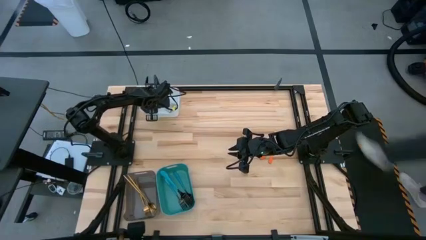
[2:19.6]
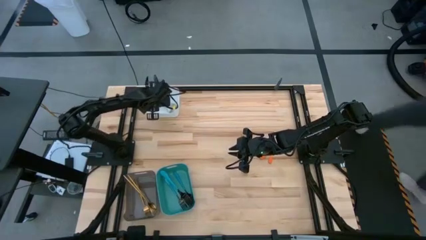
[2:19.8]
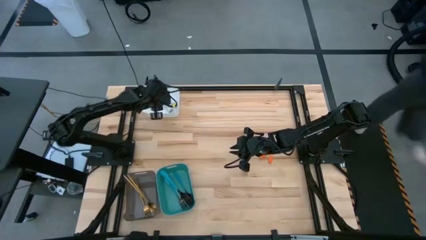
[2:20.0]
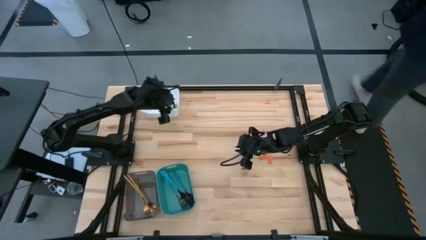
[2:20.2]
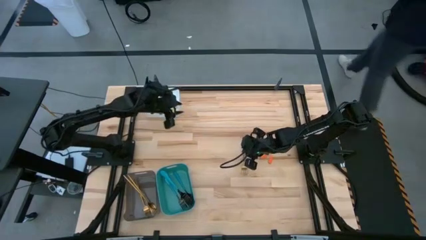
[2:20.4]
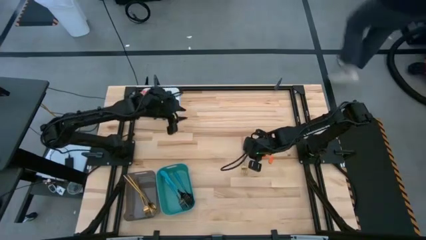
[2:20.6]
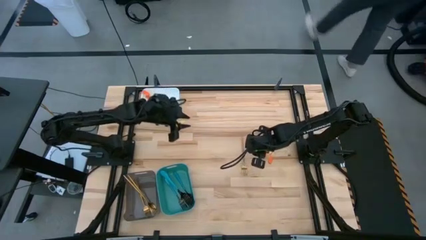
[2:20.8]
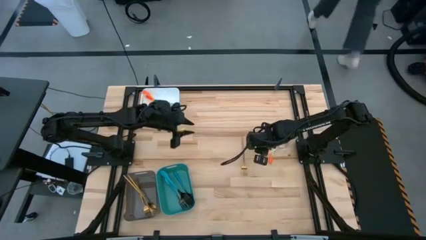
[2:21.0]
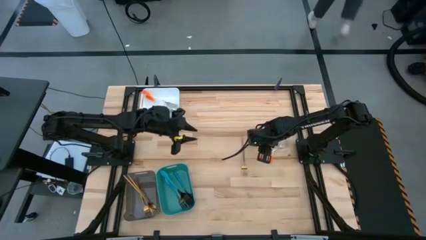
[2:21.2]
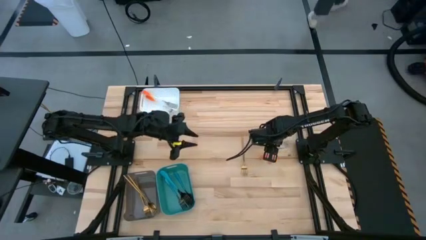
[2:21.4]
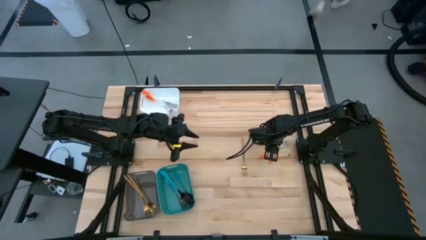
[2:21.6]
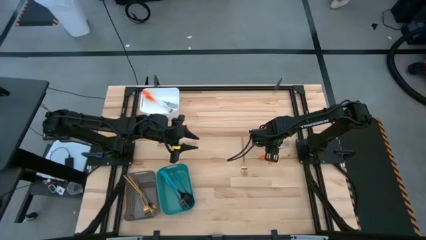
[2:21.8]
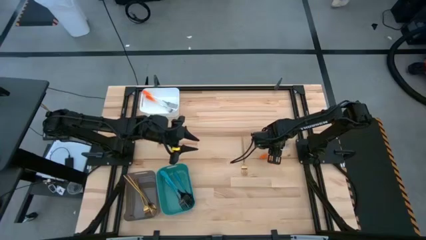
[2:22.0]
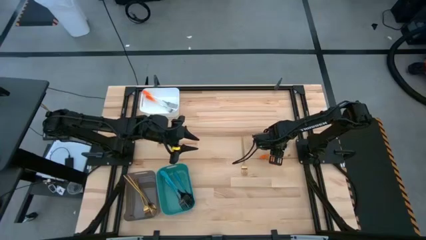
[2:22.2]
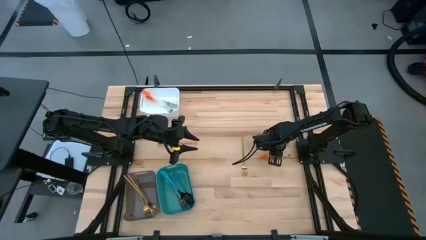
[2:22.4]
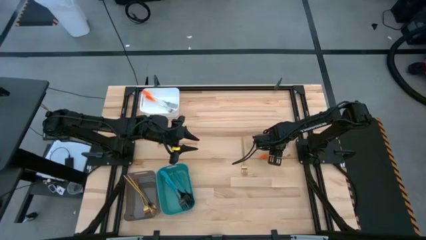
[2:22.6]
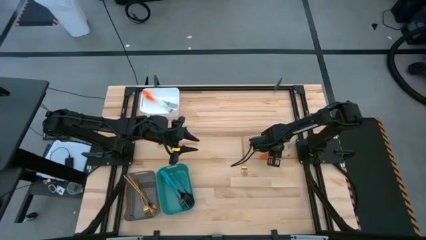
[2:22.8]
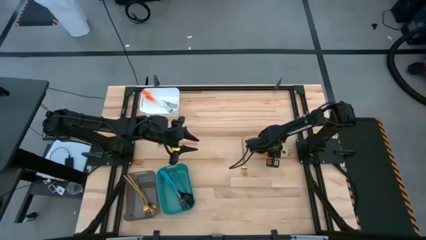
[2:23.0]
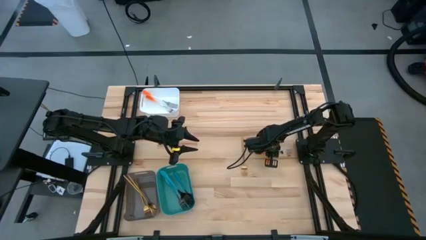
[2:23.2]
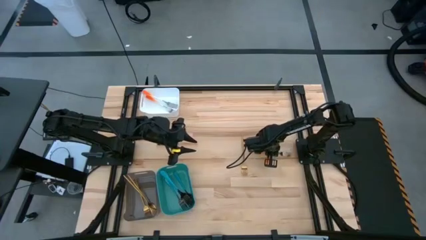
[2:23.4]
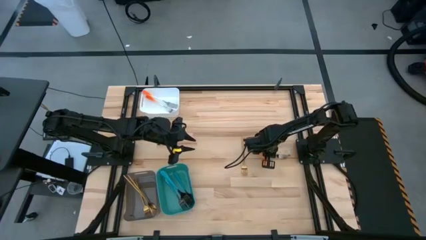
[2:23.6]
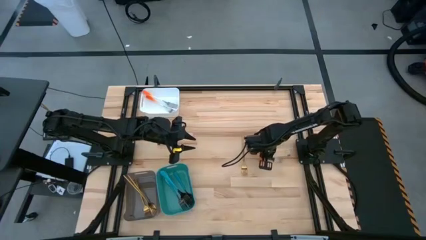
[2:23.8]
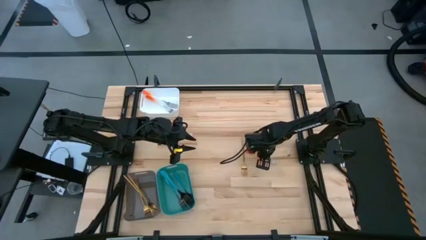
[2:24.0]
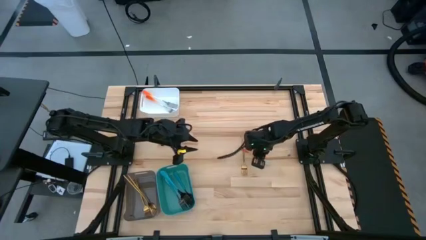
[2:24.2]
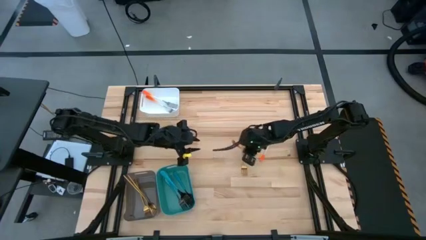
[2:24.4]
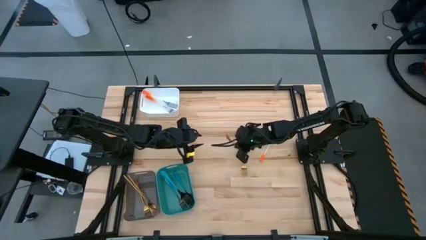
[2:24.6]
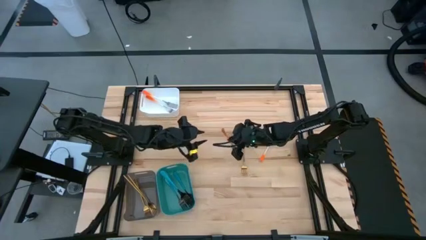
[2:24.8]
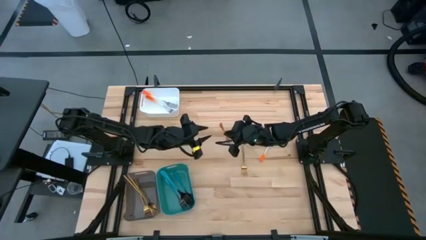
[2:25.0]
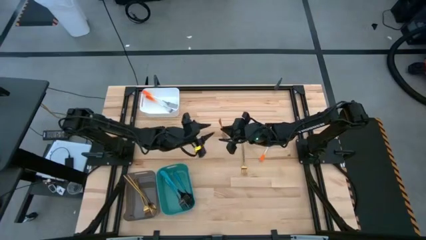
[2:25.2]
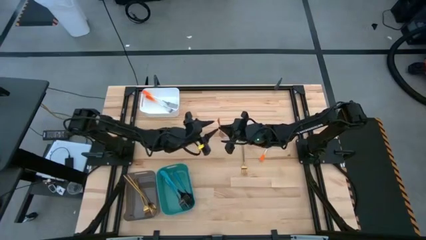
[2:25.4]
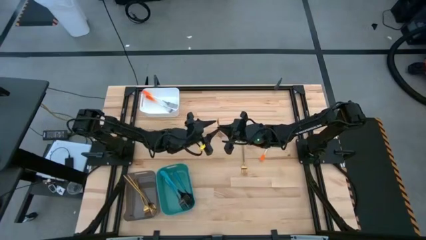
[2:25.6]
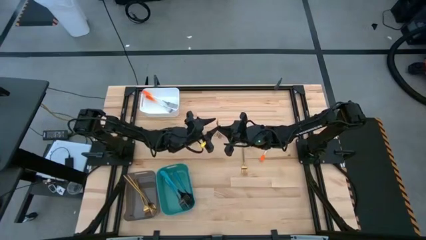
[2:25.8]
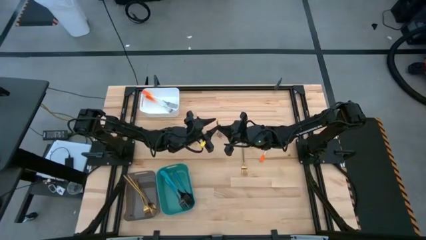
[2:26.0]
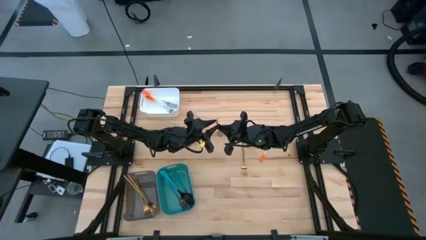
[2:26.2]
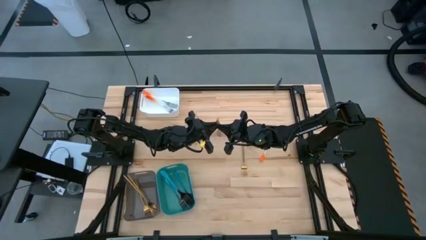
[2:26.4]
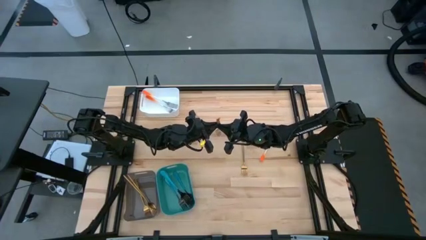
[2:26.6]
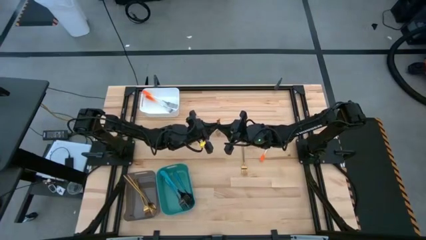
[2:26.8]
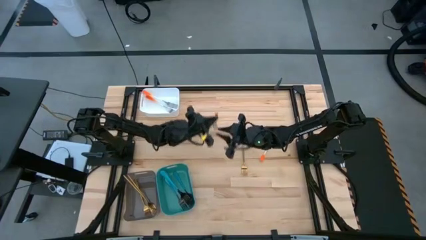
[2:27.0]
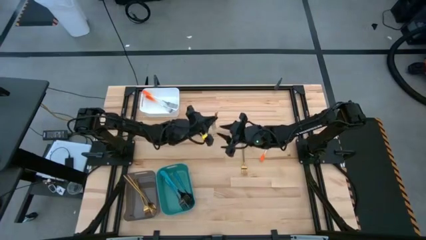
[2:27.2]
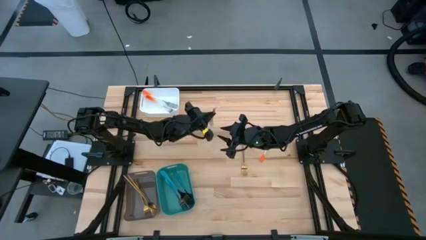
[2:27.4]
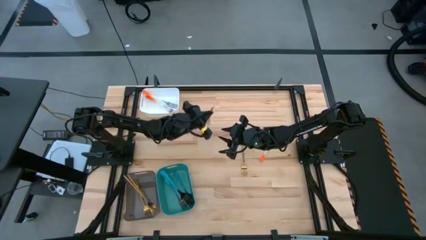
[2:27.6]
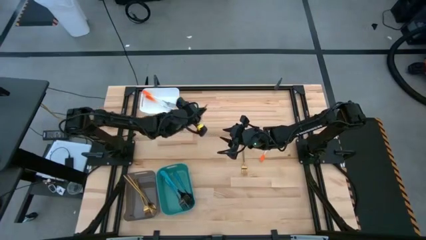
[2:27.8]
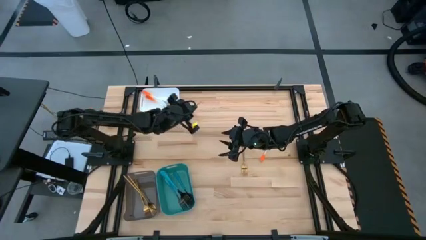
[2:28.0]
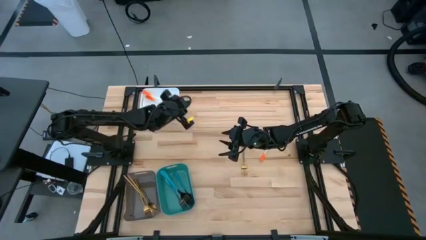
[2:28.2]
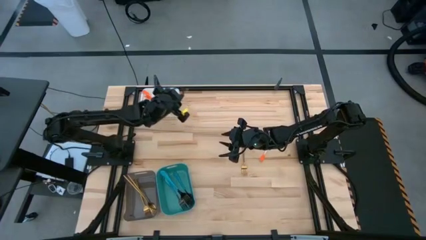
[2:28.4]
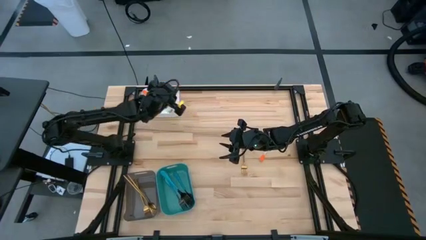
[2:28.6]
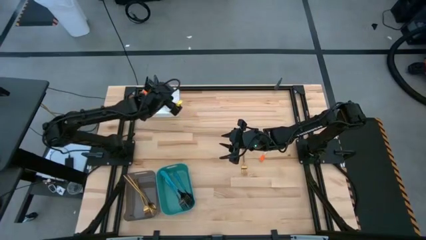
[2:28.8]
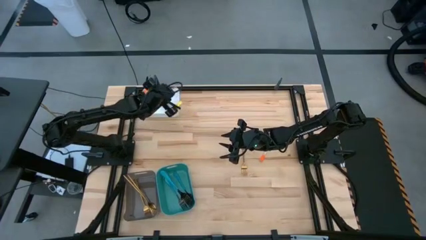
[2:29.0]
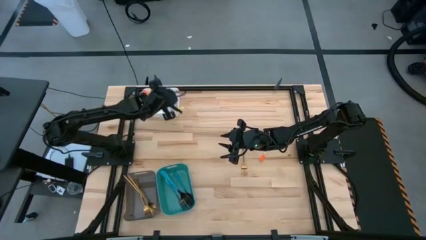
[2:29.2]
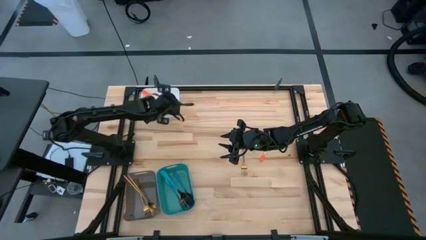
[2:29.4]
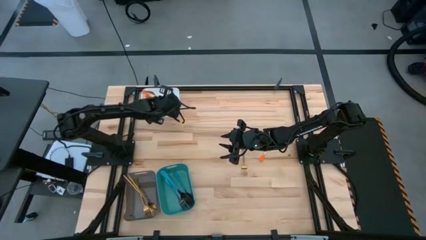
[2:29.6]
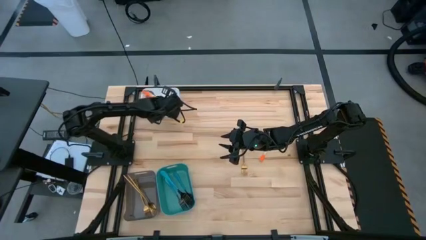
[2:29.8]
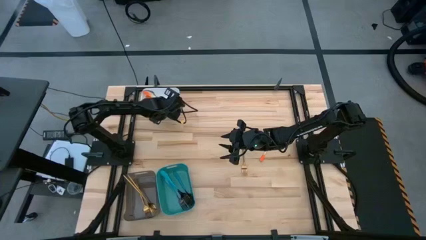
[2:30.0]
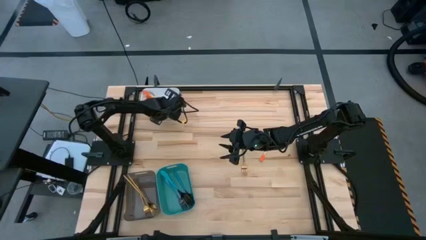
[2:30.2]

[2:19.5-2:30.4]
Task: Sort silverware by color (type)
Put the orange fork into the white bin

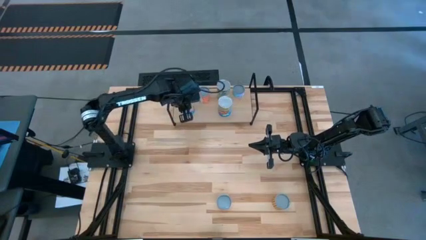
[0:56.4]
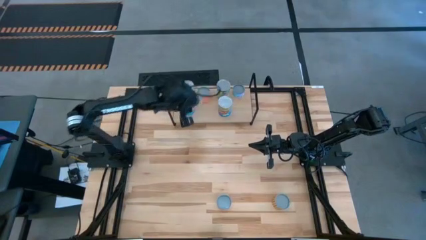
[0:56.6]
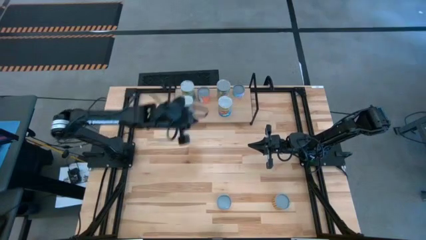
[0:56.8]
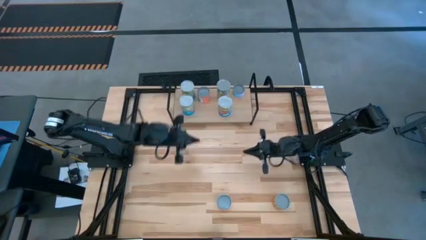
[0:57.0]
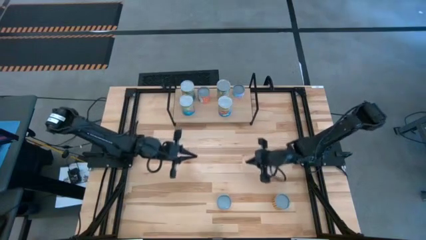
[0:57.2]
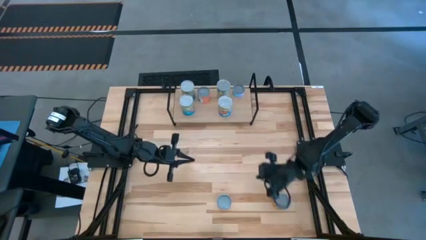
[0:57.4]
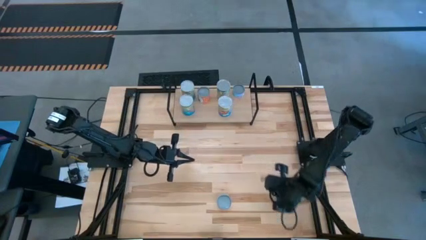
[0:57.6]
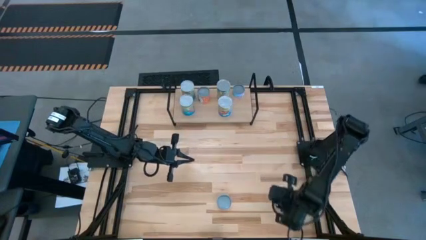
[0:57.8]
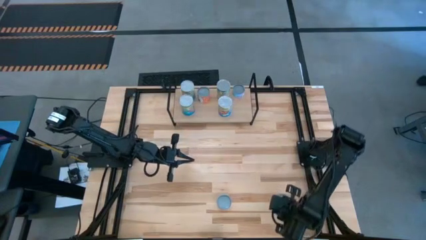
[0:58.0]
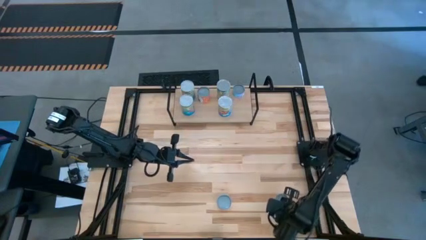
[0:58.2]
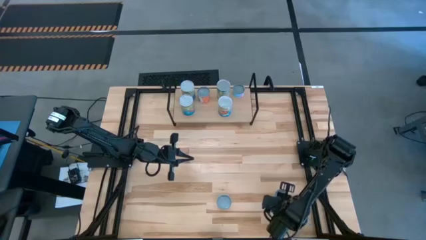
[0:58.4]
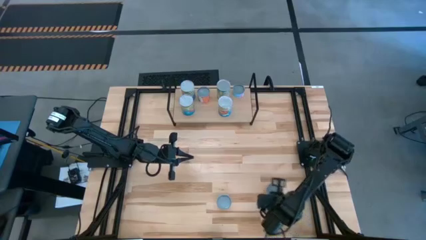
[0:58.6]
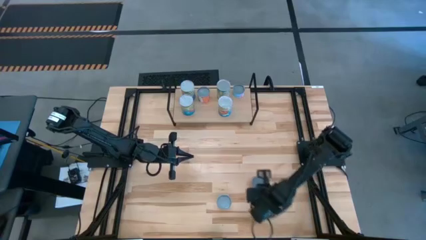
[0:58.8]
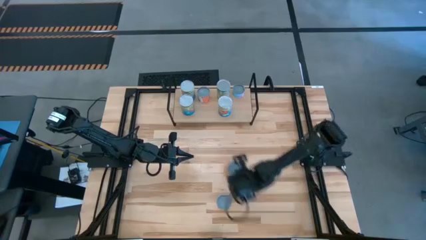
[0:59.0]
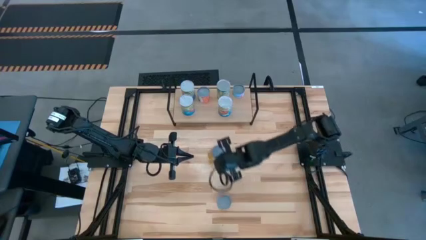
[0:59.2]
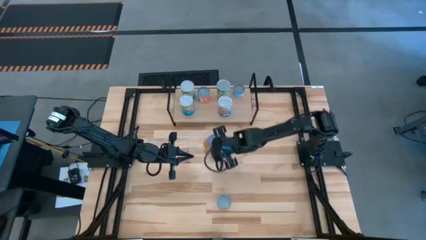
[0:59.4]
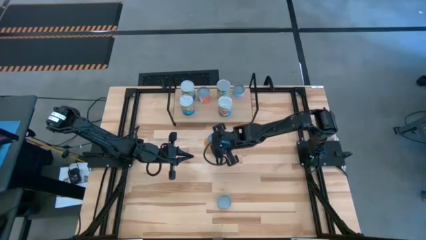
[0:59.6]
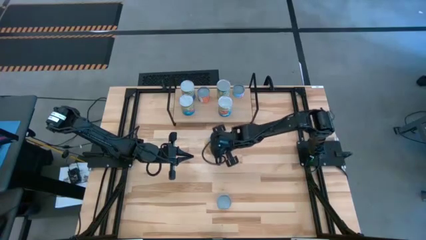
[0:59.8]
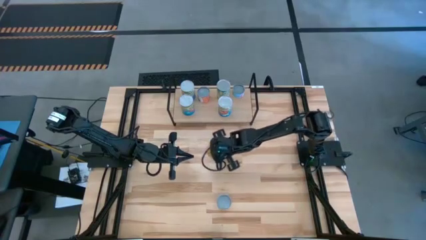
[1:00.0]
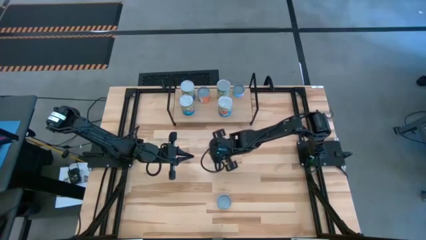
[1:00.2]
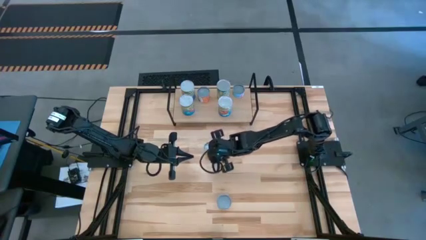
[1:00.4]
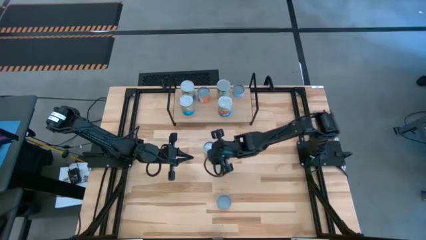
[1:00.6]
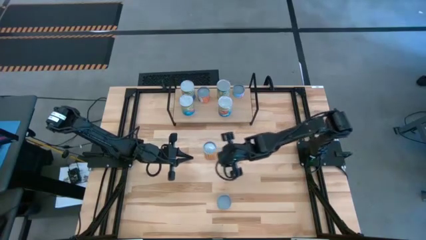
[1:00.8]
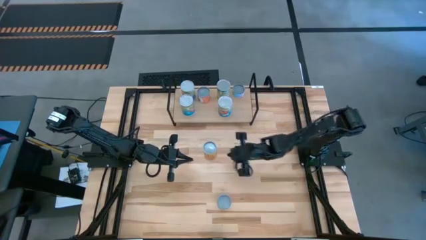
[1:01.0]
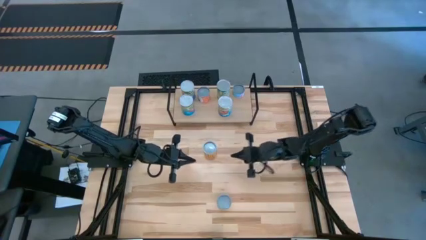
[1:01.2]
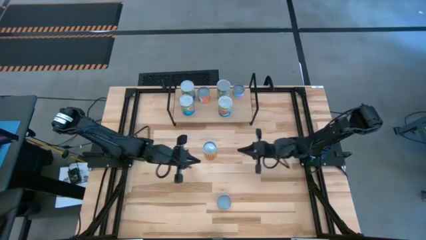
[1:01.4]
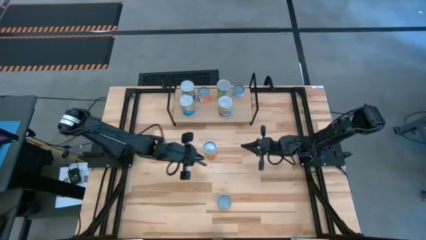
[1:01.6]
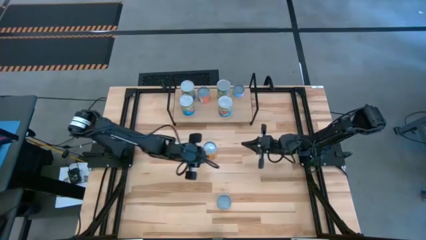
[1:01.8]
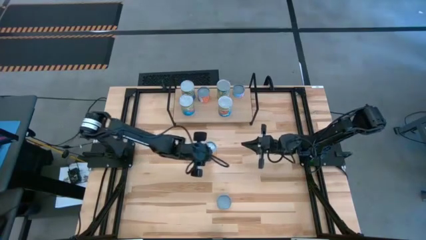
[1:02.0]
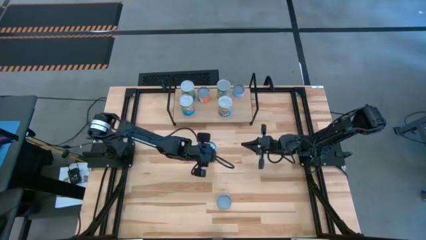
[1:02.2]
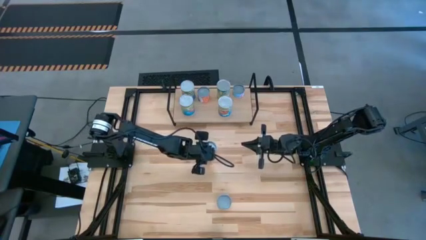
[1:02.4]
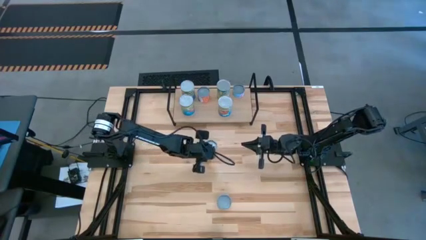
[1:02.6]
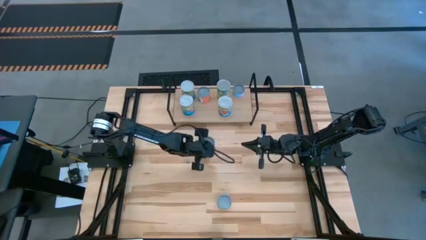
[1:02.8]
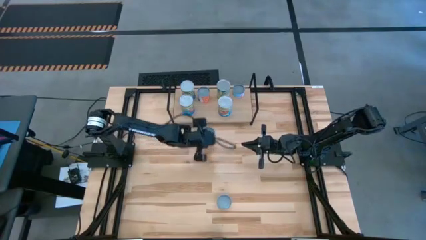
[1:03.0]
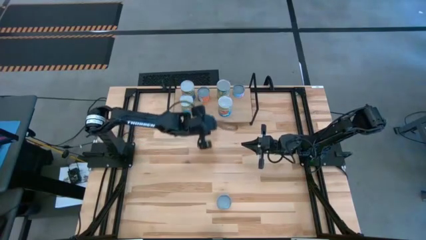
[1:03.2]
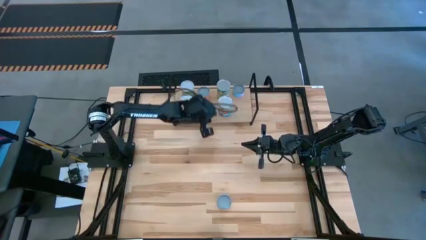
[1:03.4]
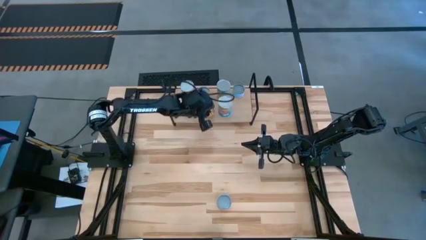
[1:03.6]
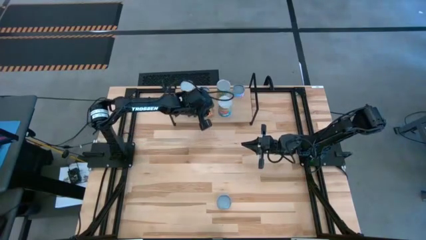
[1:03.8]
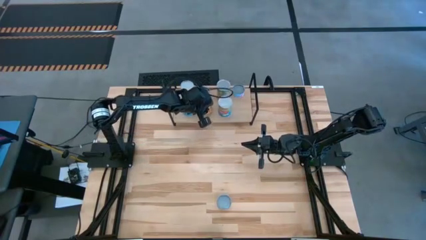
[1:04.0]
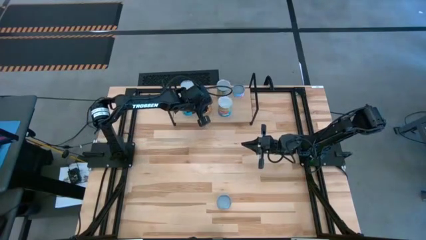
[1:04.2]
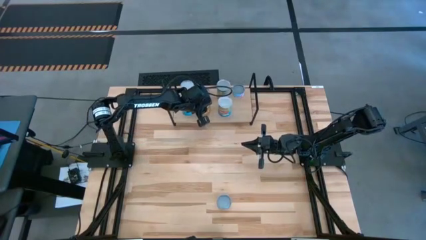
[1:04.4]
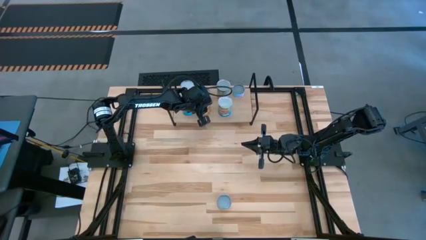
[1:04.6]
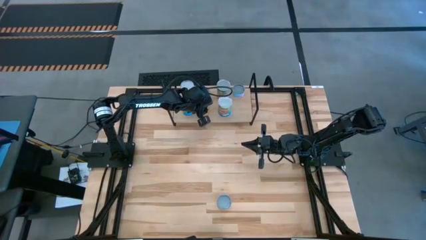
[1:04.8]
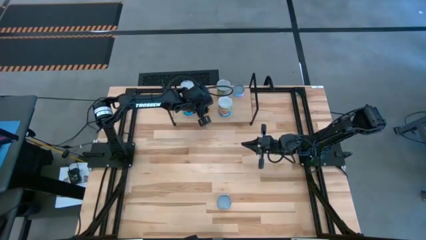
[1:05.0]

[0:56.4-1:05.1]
Task: Pick and place cans onto a shelf
Put the canned beans on the shelf
